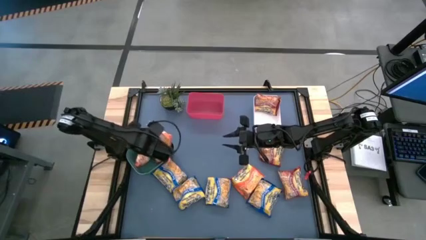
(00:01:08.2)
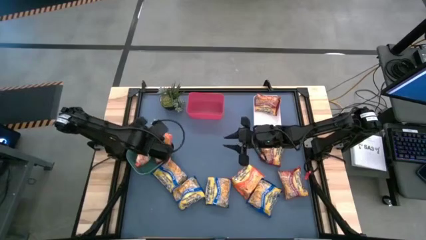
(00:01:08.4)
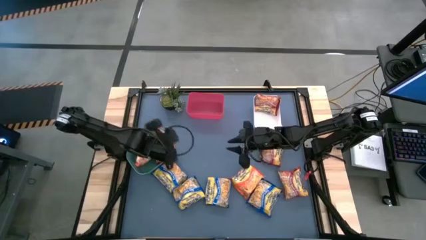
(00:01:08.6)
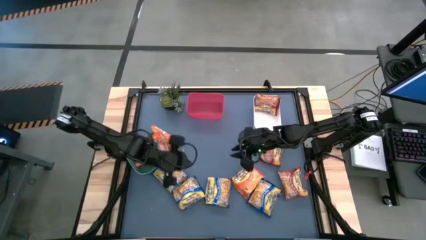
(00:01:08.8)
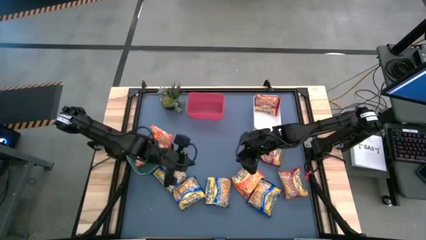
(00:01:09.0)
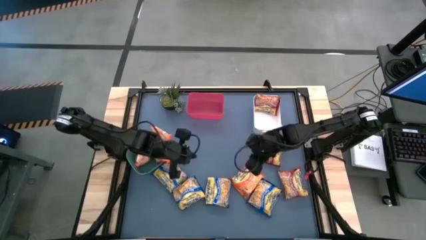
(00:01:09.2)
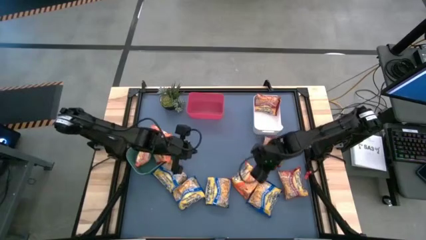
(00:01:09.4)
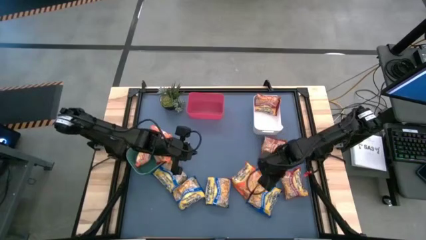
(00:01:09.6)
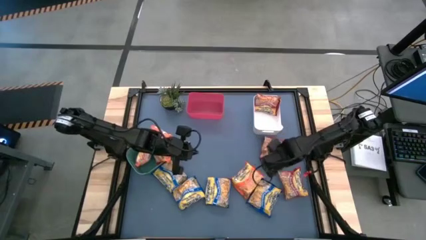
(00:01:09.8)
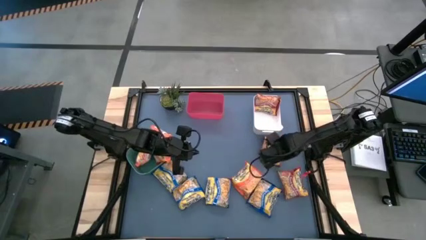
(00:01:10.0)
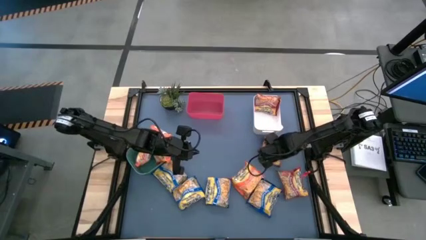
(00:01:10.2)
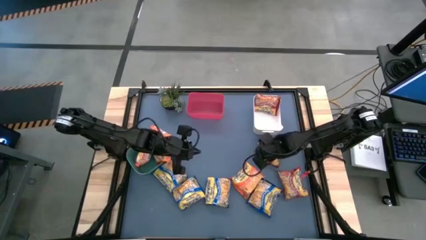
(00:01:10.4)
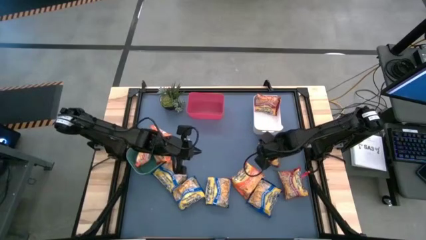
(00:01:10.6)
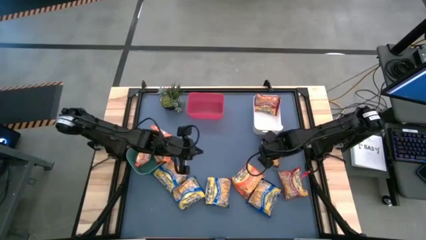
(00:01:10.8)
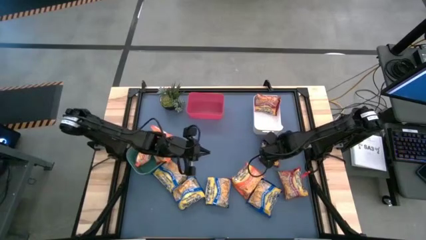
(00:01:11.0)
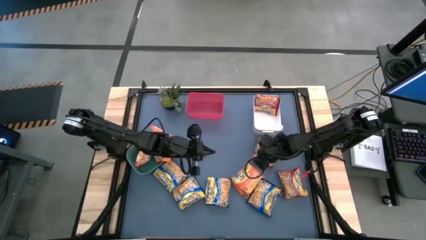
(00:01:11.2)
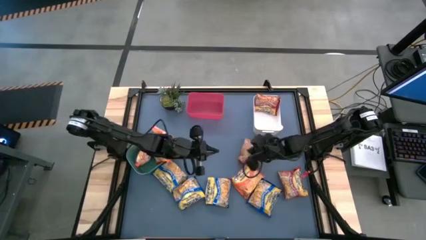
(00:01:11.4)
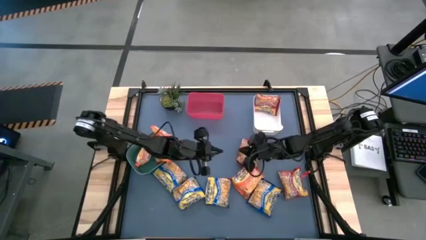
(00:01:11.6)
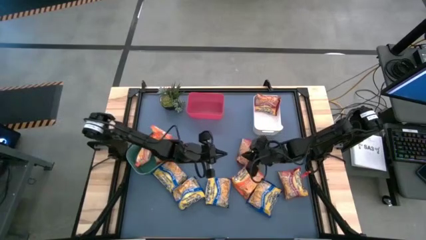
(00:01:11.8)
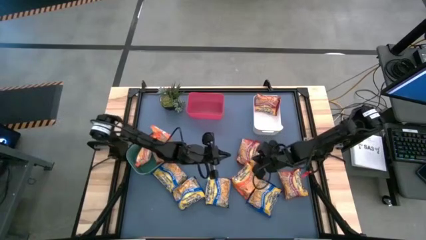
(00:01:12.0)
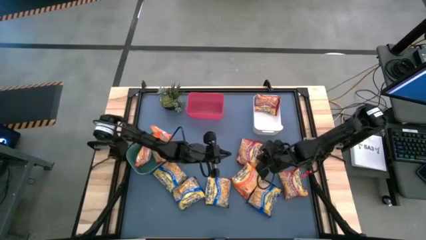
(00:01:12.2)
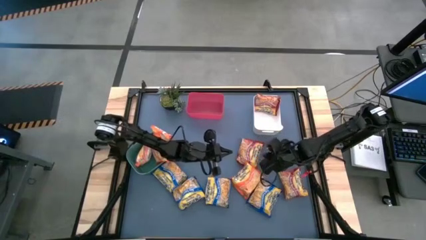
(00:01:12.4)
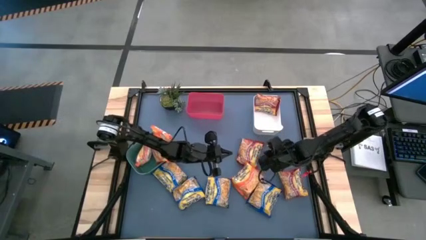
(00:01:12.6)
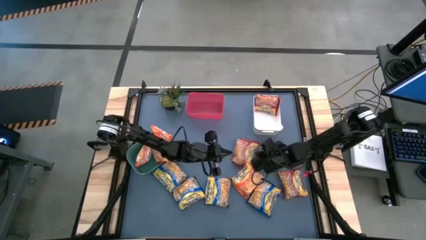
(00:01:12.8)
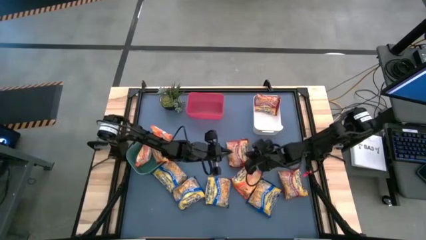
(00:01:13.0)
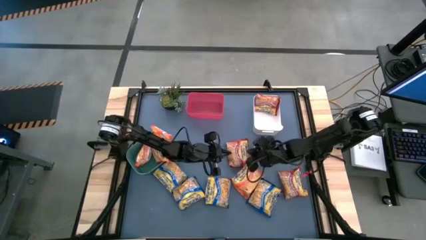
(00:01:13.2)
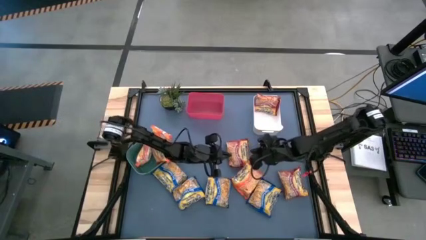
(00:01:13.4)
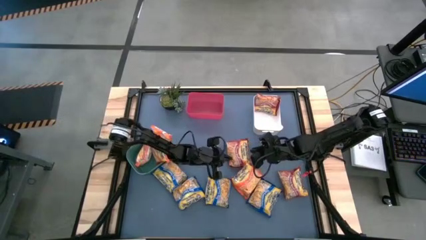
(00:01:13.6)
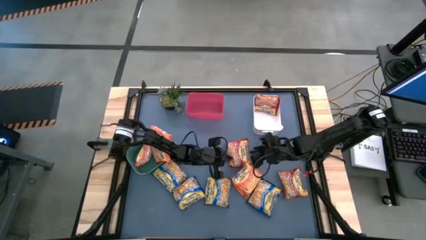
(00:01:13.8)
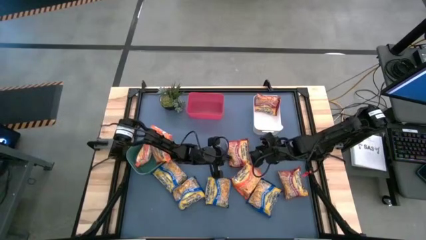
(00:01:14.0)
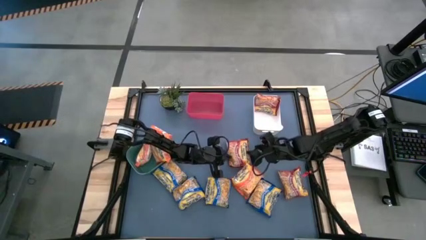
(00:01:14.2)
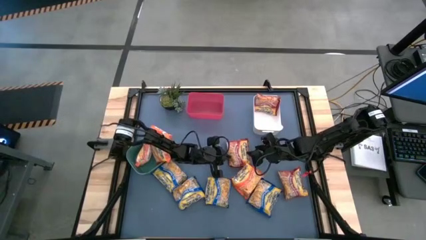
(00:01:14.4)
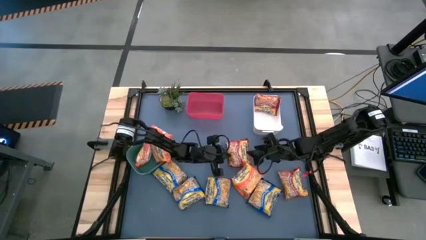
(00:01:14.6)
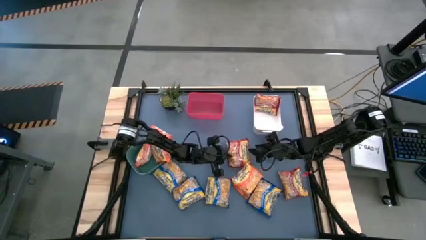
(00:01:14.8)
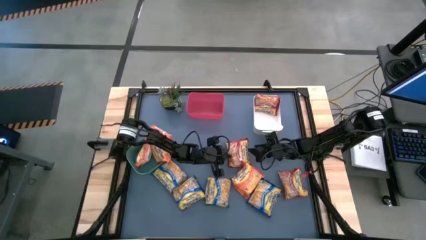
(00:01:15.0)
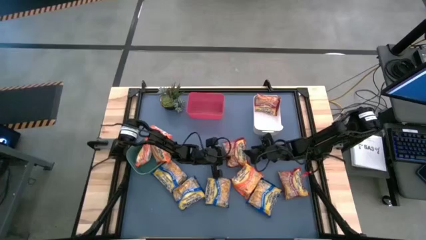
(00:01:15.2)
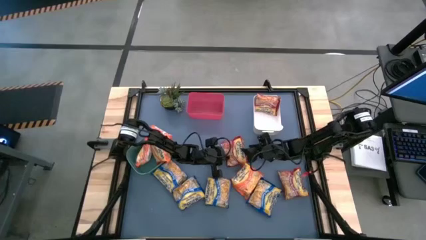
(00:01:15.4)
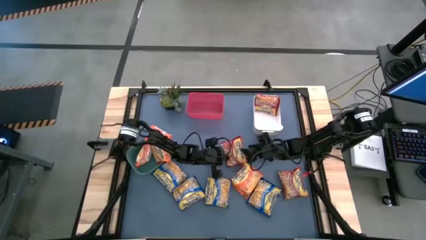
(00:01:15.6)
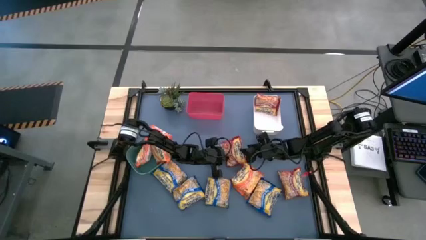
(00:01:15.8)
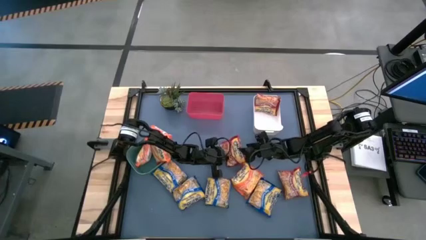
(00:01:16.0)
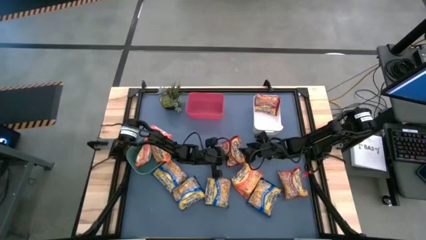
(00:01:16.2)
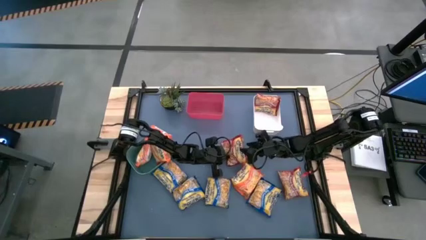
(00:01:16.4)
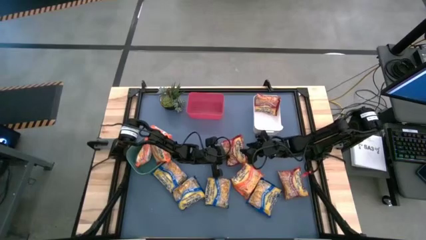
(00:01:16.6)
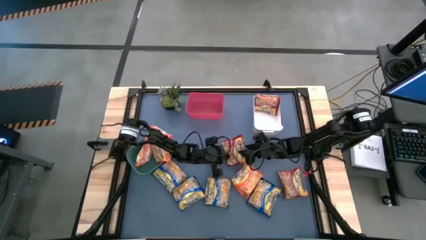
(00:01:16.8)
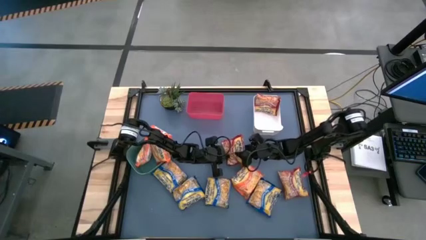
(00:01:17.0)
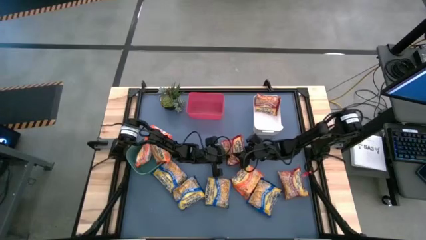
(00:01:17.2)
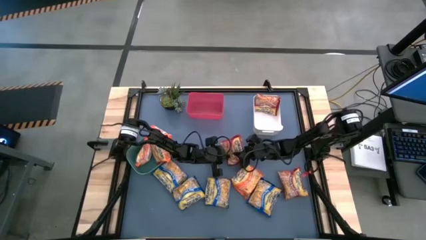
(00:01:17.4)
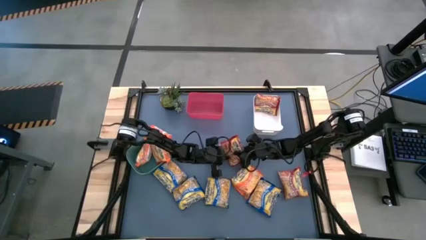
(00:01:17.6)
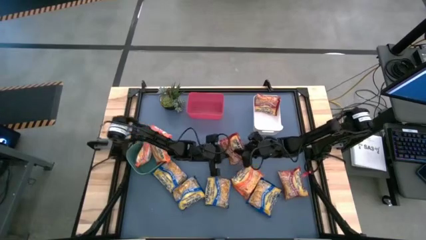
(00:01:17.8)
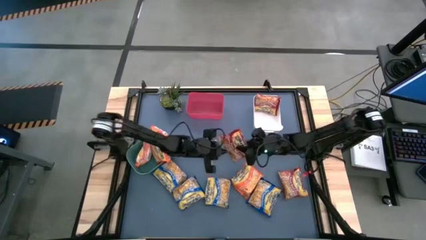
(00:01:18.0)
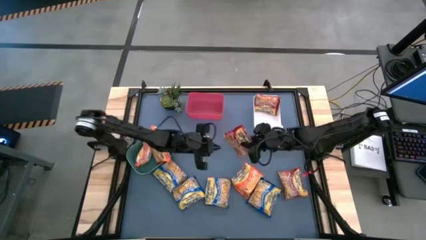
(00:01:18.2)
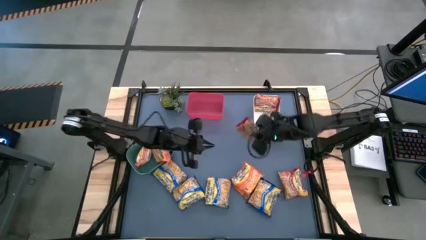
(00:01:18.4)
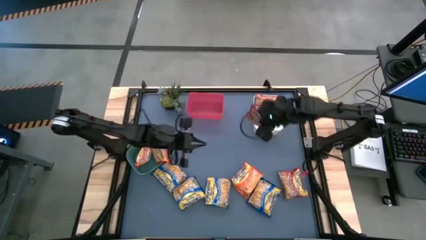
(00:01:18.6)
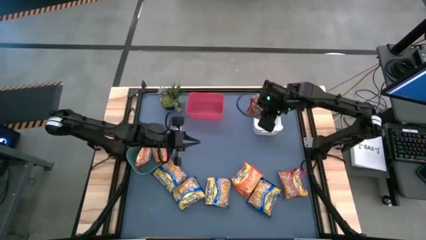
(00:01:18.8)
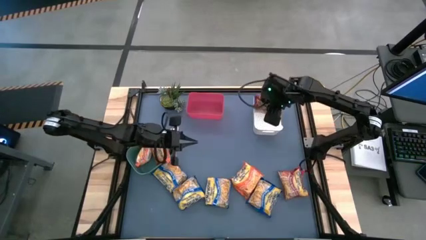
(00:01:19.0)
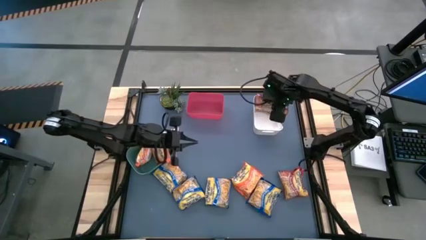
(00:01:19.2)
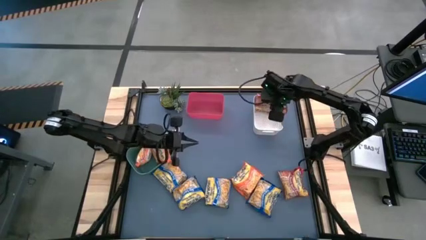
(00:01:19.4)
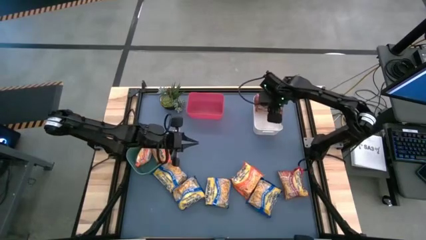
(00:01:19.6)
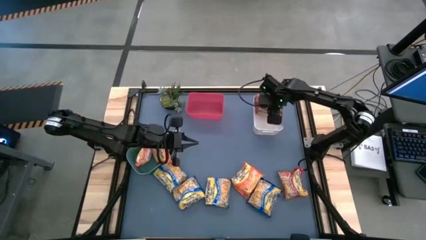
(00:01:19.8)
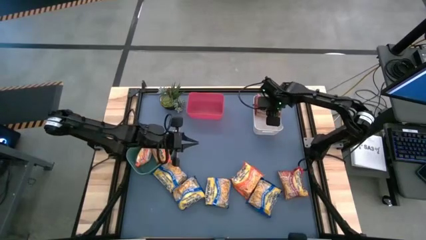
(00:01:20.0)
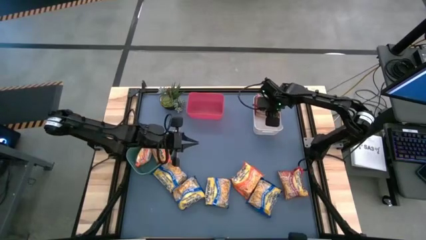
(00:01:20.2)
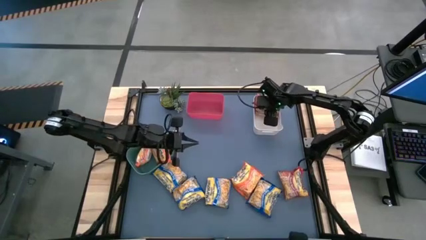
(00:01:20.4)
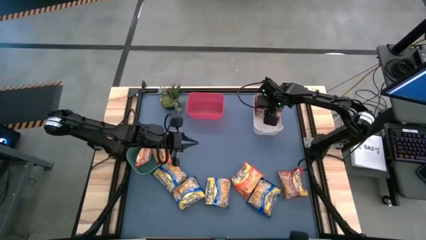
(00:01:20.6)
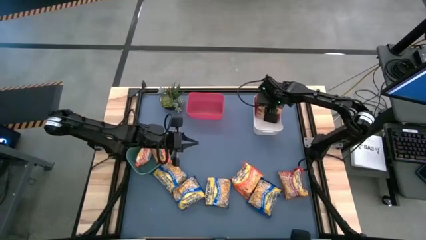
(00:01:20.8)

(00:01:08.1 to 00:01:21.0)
Task: Sort Maruchan noodles
Put the red noodle pack into the white bin

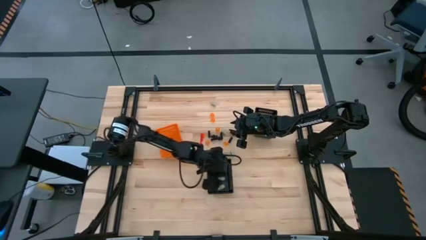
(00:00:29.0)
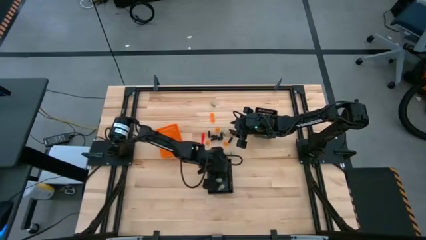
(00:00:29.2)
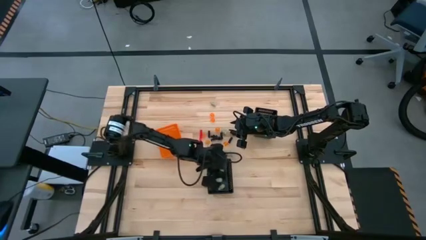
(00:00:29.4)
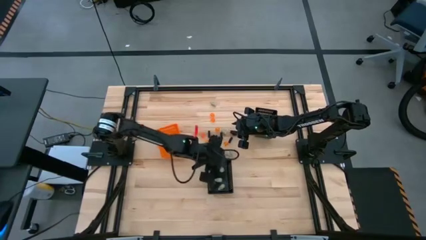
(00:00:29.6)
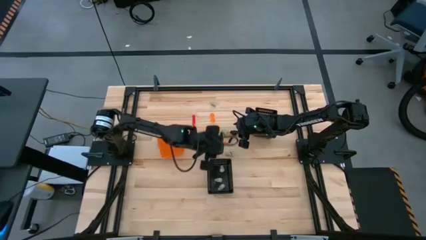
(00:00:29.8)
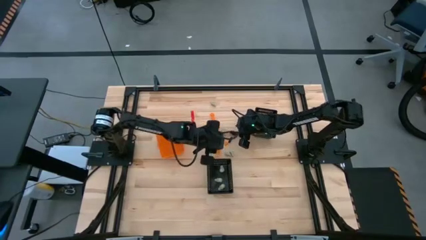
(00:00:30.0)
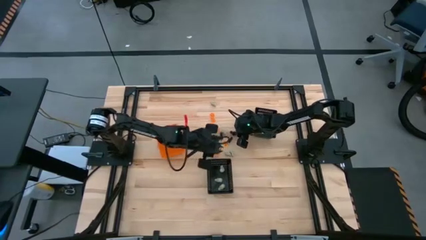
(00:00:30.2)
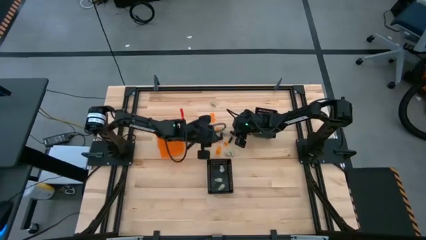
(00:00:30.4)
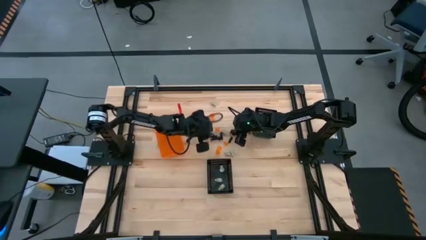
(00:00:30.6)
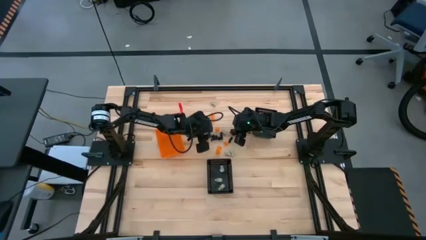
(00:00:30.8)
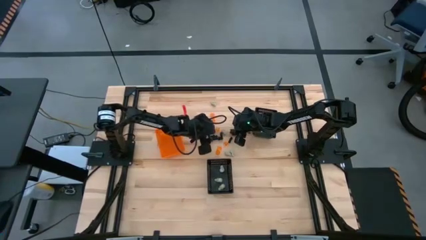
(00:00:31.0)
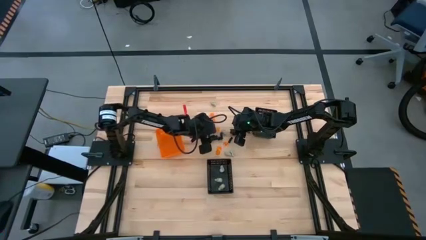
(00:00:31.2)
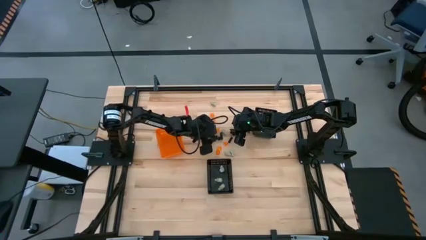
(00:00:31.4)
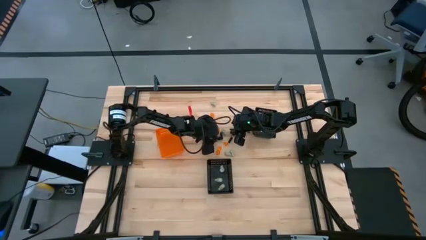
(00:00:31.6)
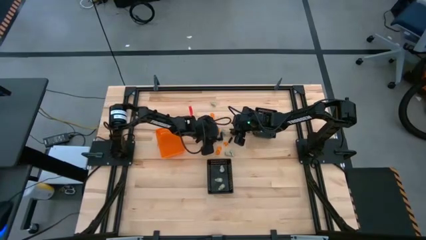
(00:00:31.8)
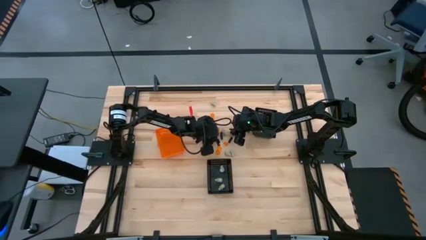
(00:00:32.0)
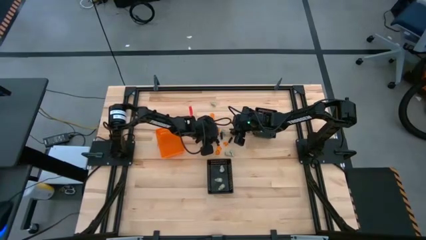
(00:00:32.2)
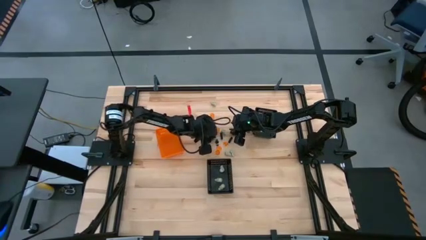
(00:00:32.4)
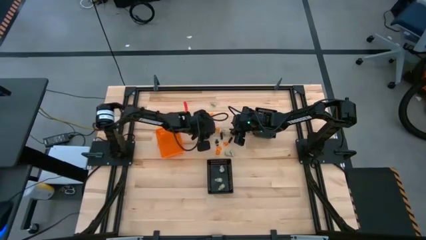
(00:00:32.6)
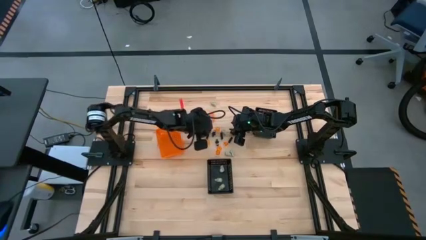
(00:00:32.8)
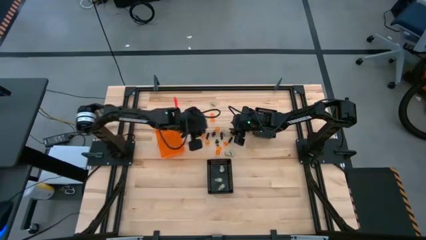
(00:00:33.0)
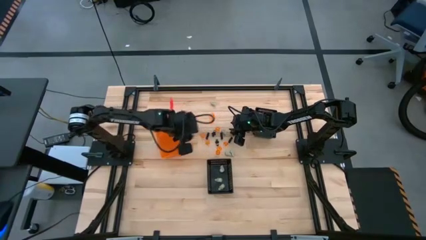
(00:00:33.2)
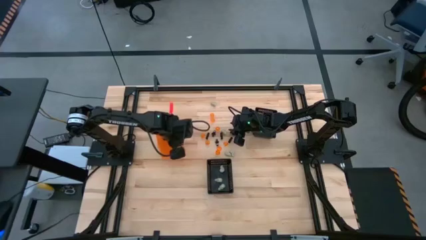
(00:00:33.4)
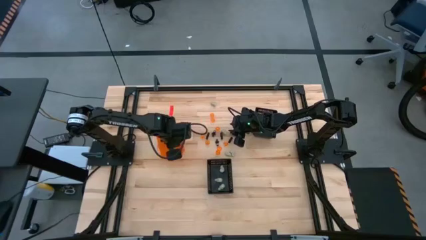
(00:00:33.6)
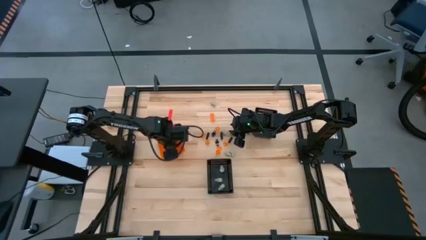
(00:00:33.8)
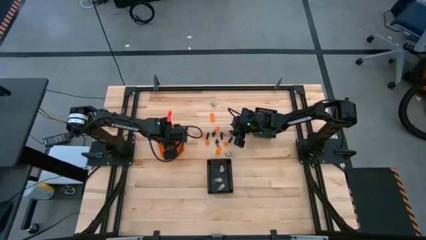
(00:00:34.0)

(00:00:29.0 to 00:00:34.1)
Task: Sort Halloween decoration
Put the black skeleton toy into the orange bin
